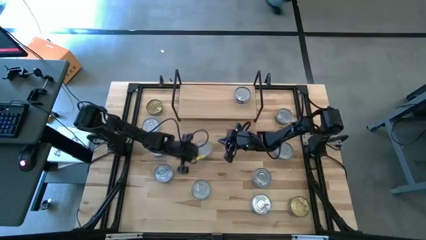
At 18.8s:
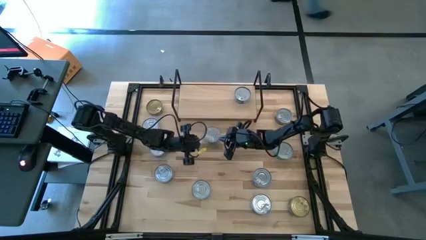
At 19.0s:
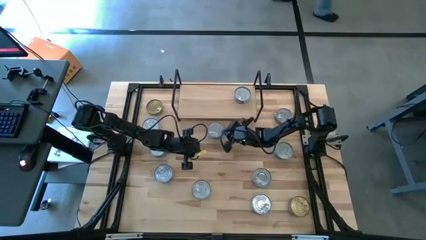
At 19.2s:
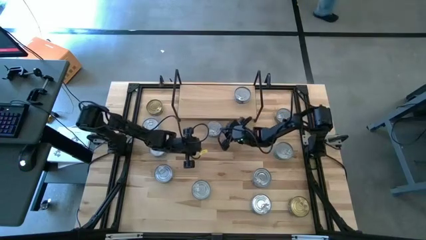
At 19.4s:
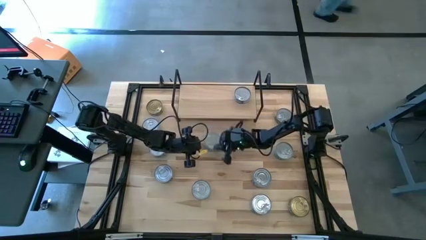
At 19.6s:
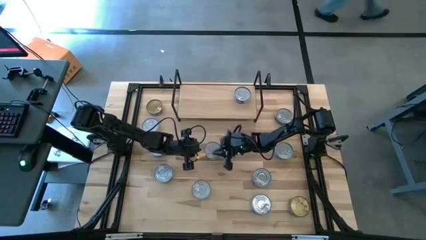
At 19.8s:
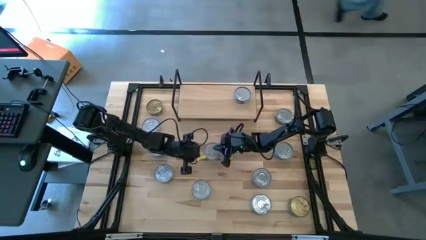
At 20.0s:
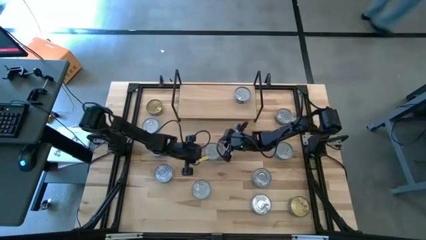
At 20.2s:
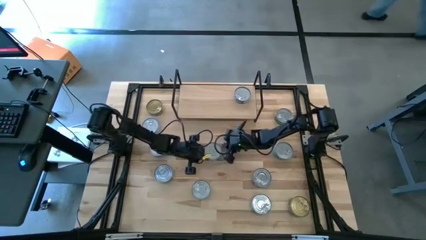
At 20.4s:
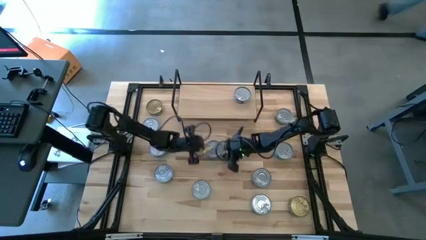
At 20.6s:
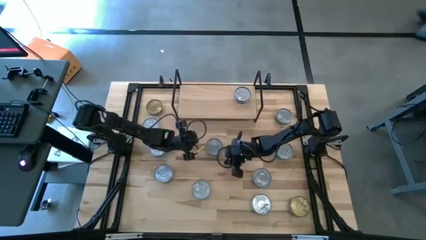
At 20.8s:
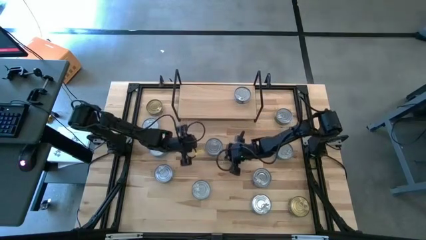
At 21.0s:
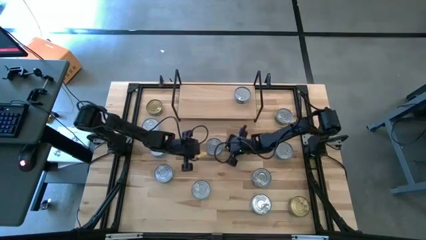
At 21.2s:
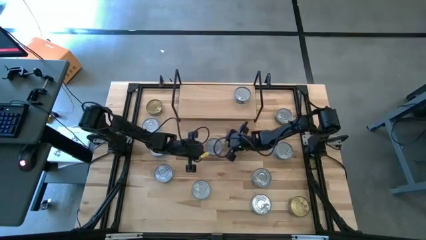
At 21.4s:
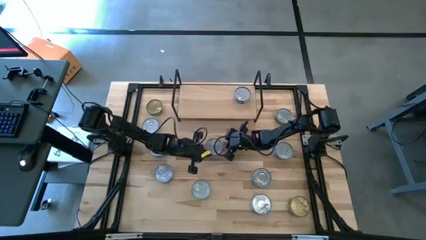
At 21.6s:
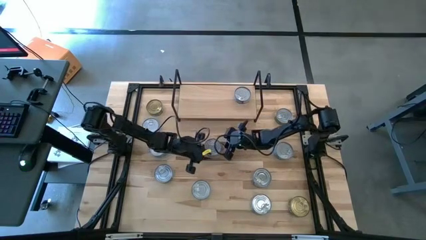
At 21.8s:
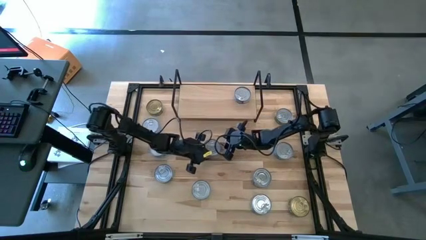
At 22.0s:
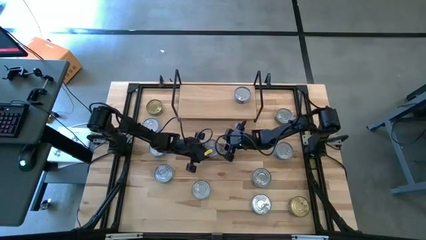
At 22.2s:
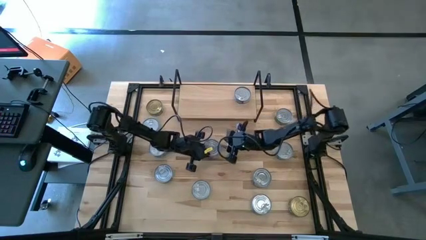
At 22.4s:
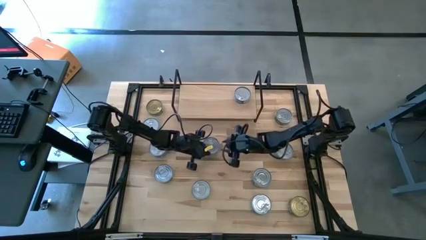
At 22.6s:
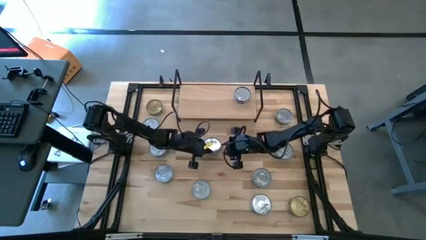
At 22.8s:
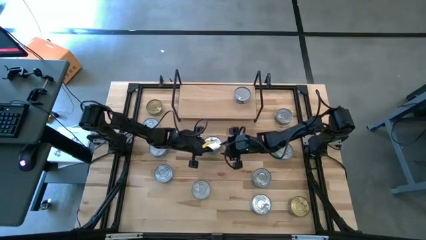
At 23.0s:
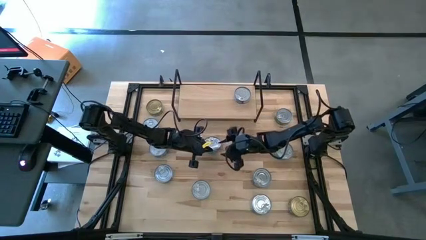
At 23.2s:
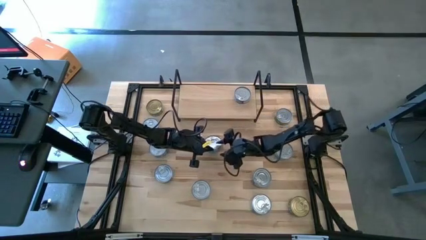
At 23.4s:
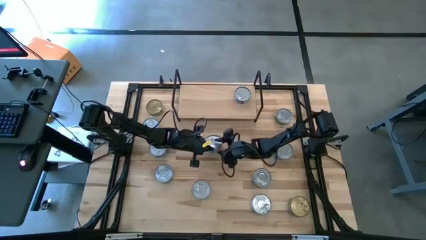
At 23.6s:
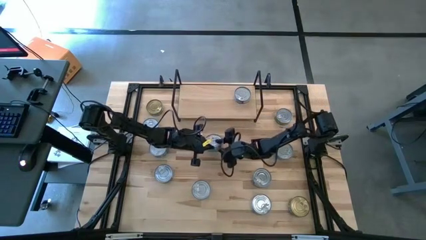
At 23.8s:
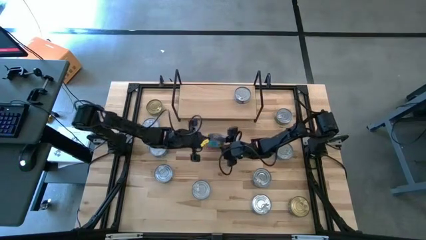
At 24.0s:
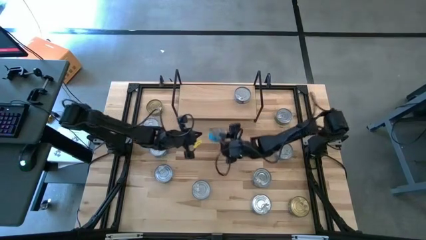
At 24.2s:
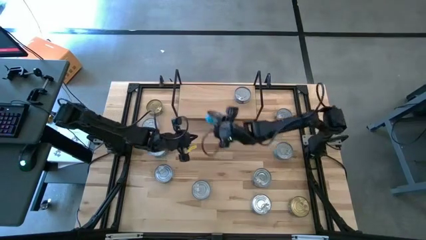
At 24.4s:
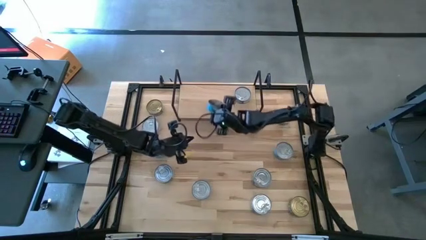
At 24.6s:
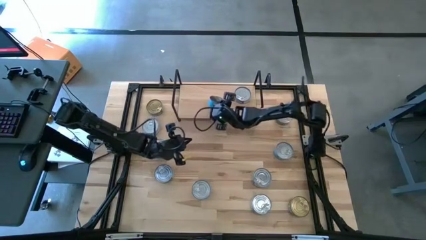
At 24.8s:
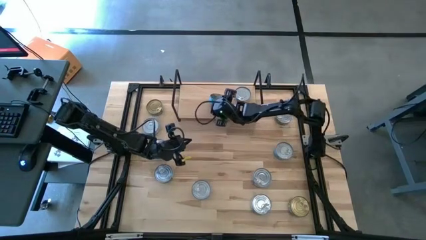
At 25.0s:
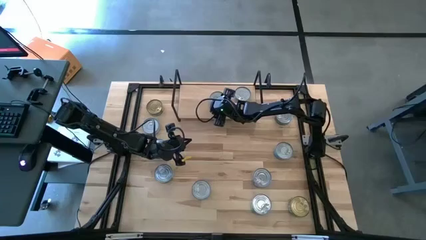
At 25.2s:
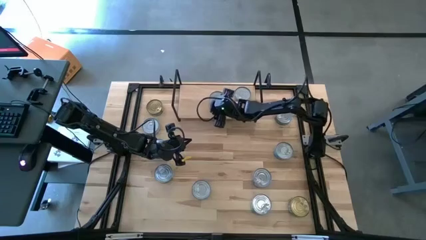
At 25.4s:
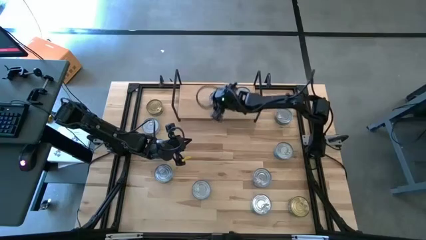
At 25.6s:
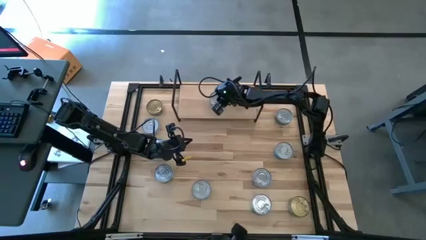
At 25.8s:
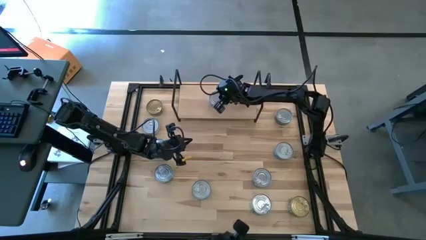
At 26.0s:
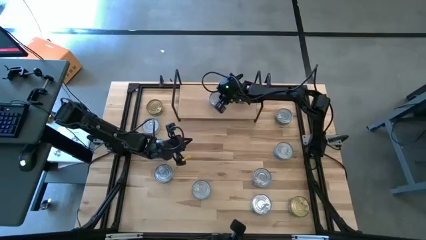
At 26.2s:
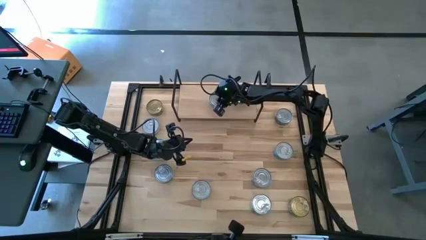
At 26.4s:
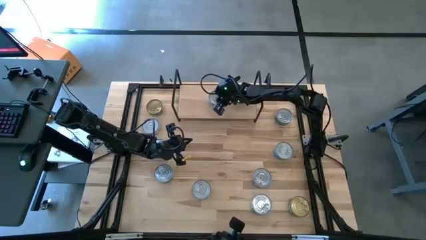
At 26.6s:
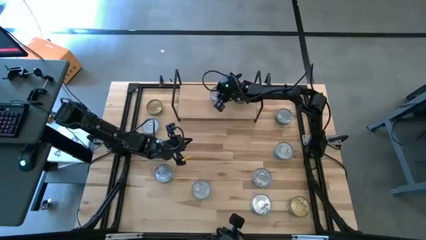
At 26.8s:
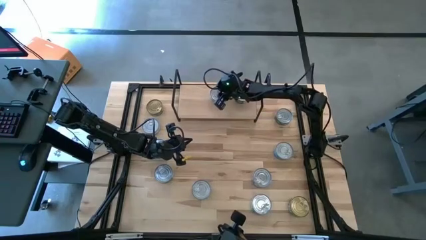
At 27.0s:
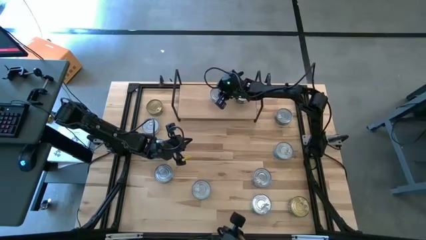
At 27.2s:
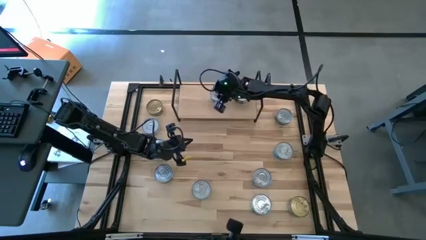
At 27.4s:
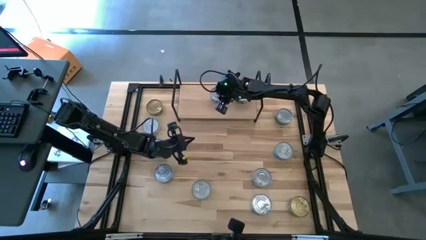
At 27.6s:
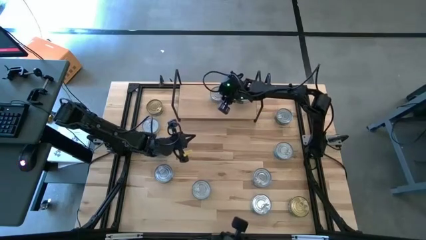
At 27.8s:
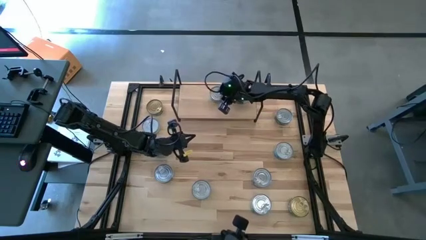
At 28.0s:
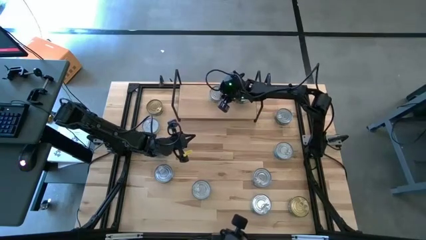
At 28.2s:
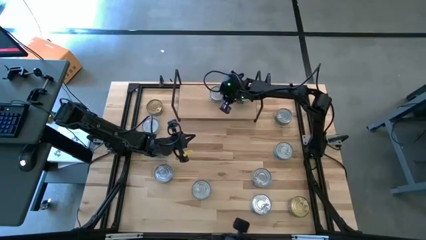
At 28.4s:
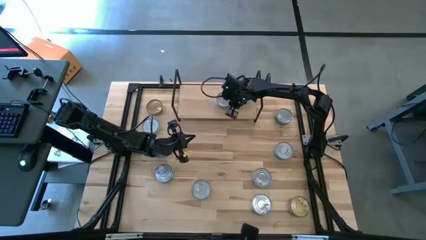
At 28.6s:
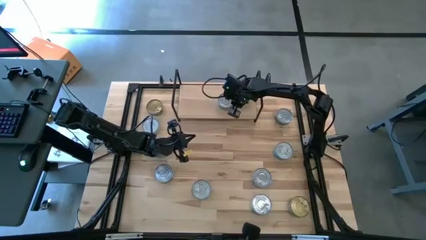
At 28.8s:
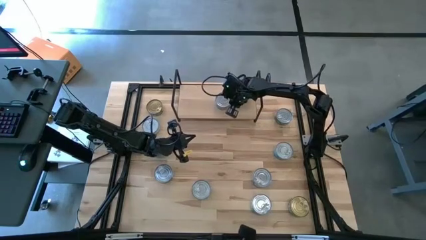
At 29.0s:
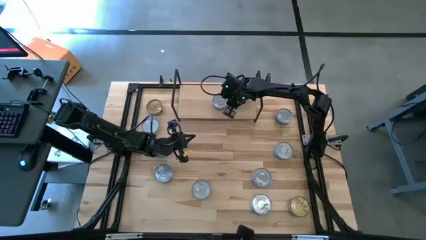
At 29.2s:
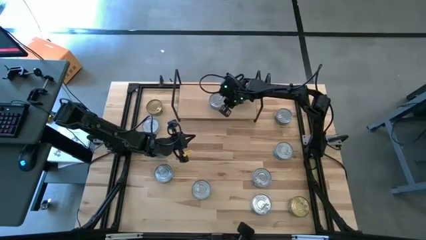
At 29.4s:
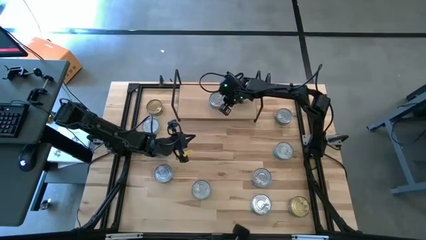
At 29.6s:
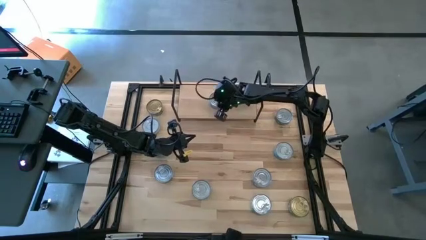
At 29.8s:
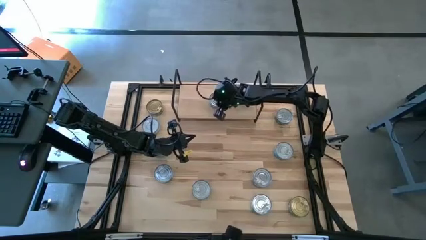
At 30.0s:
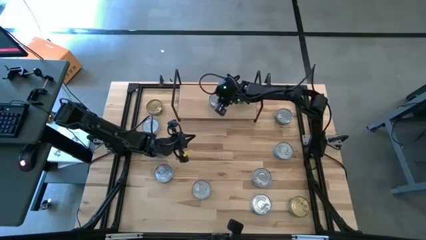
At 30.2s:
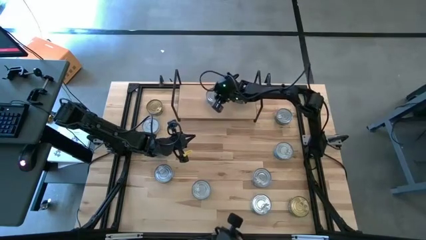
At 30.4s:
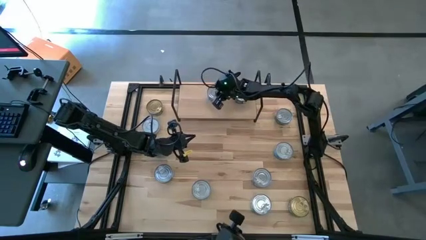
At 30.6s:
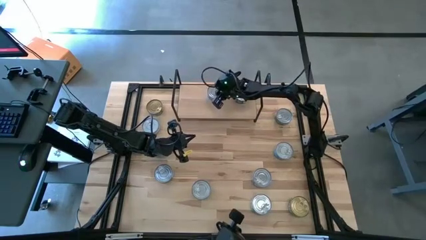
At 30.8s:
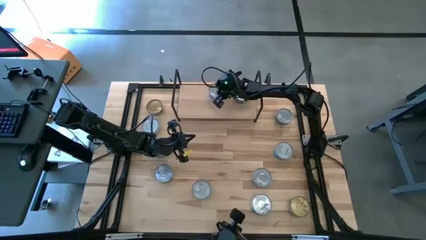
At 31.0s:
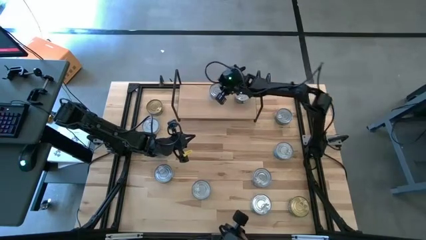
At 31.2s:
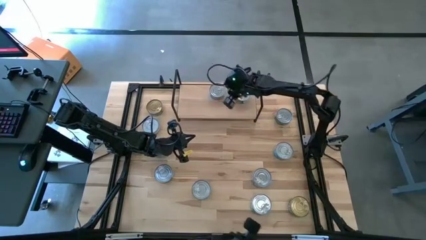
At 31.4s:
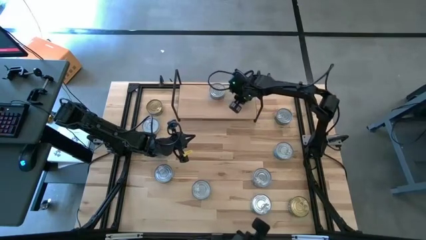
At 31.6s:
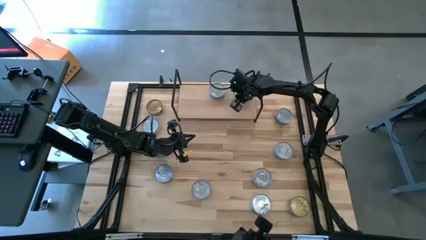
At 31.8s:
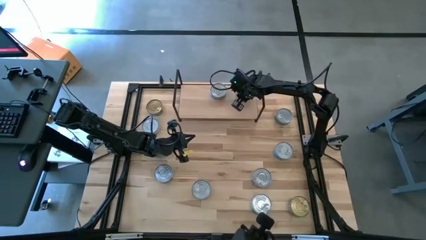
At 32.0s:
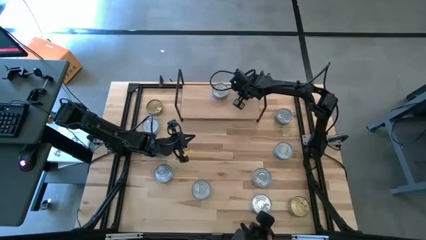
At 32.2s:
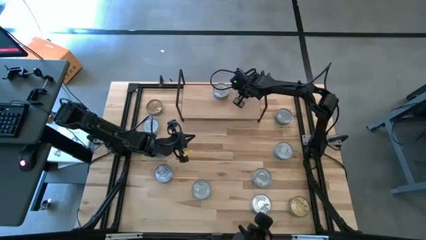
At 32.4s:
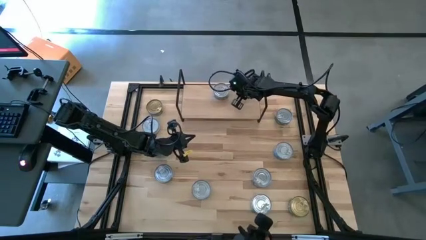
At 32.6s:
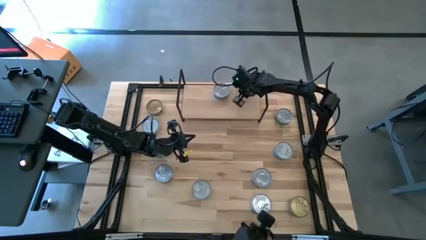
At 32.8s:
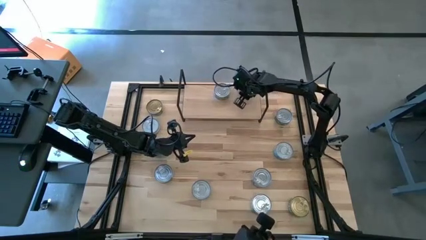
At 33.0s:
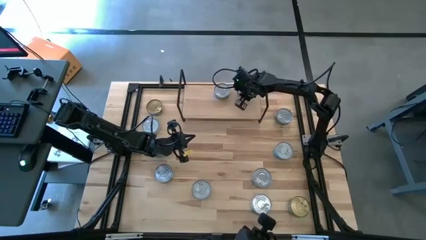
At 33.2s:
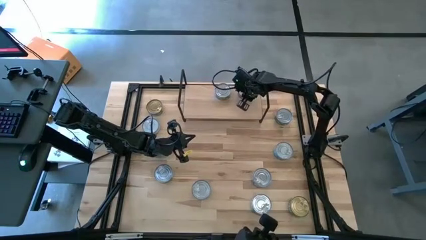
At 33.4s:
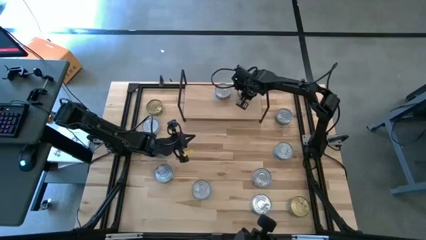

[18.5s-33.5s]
Task: Stack canned seafood by type on shelf
Put the light blue tuna can on the shelf
